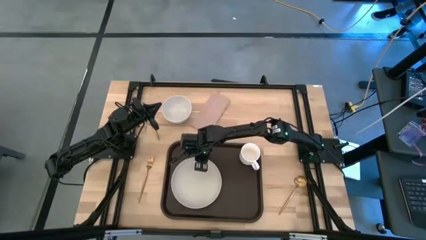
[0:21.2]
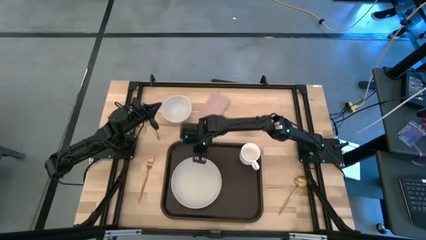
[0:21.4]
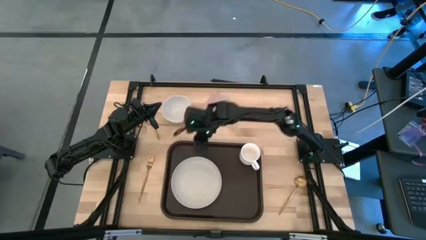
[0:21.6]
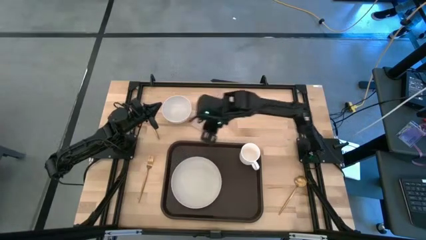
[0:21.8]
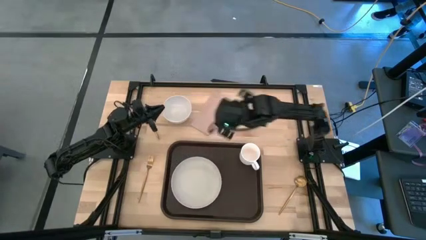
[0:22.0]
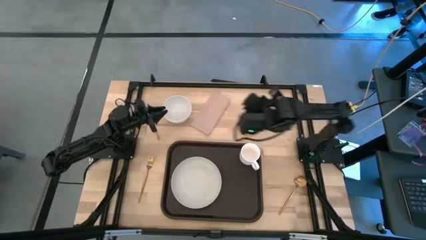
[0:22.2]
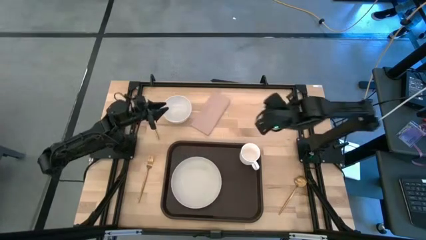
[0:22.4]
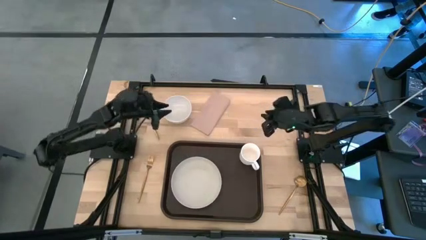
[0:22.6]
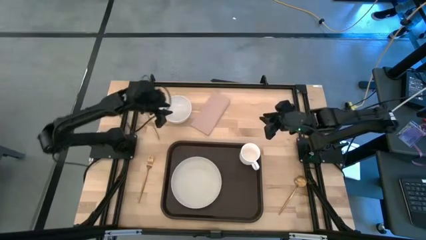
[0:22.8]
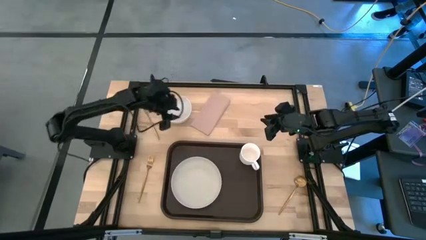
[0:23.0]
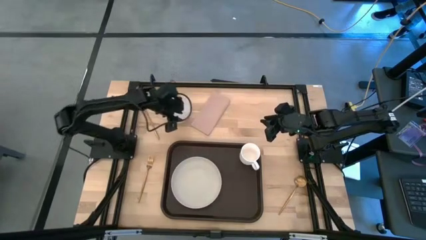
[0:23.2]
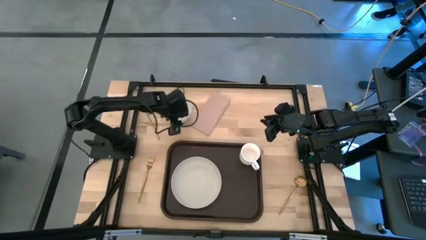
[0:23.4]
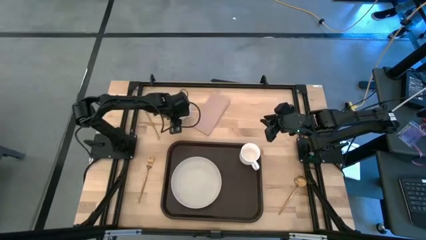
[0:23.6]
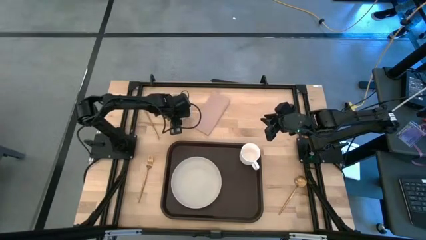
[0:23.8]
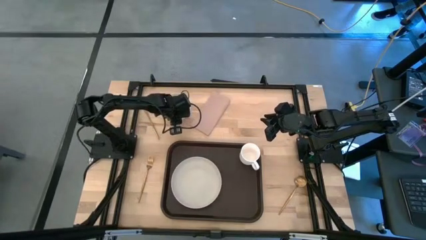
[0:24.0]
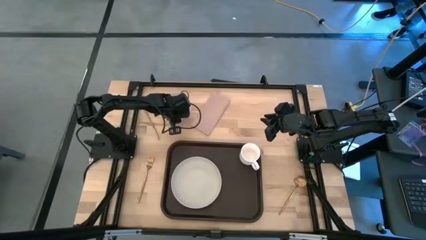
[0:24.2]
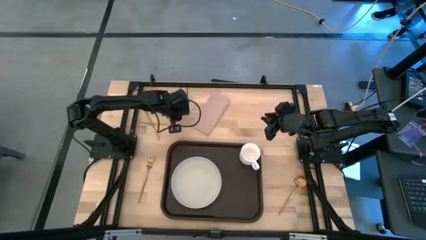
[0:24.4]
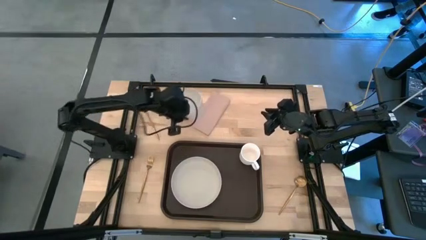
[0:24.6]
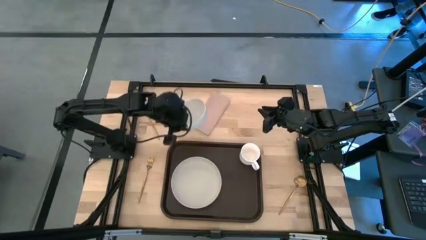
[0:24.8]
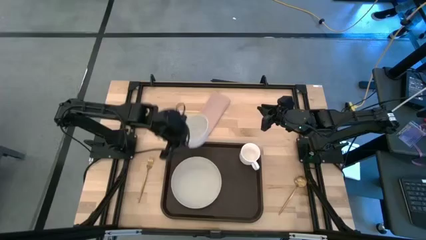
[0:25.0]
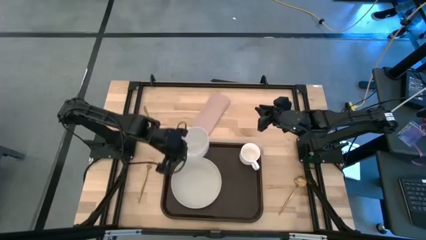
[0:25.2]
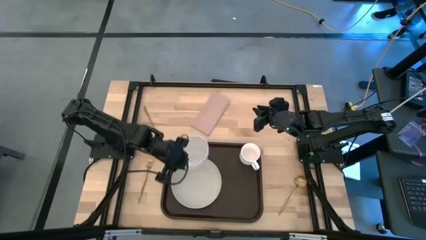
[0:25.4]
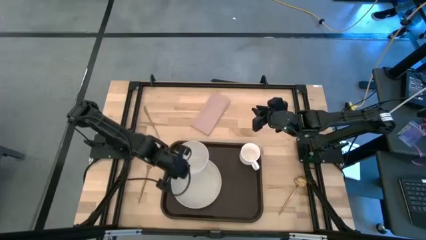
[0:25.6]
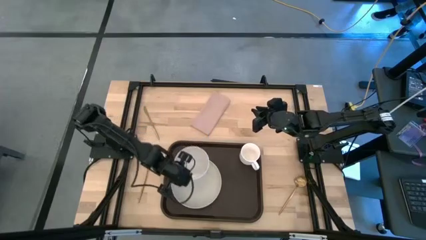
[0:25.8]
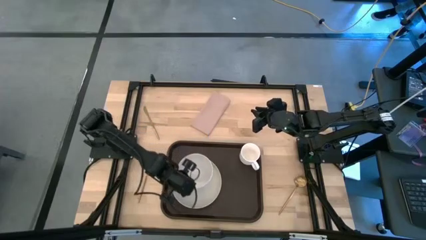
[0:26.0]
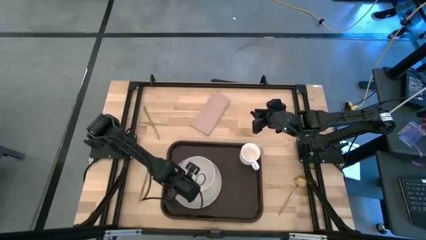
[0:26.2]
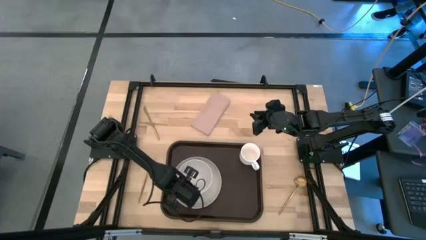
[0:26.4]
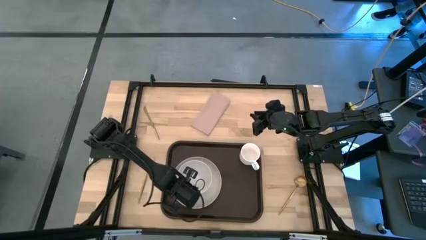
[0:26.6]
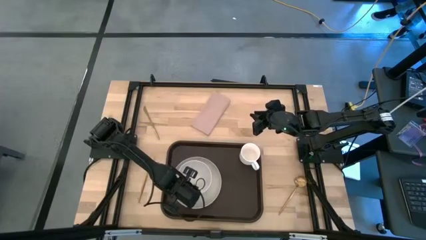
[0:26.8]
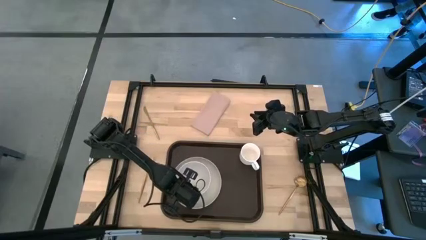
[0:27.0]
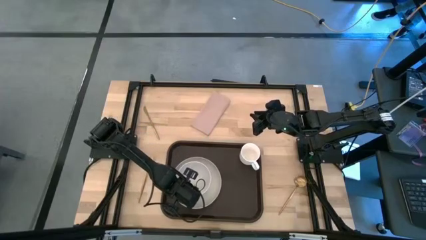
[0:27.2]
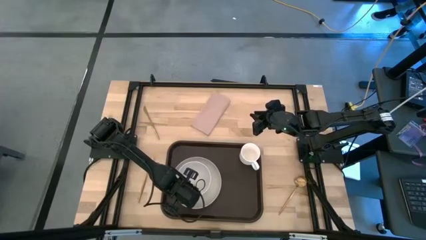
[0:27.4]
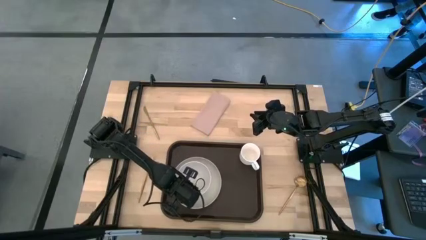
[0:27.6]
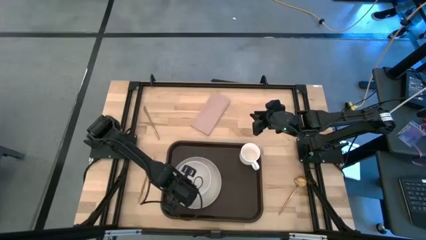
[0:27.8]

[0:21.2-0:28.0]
Task: Set up tray
Put the white bowl on top of the white plate on the brown serving tray

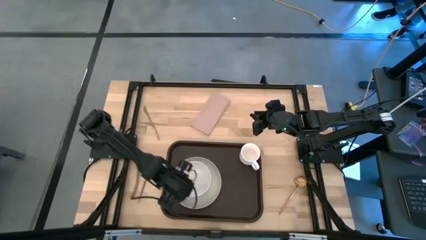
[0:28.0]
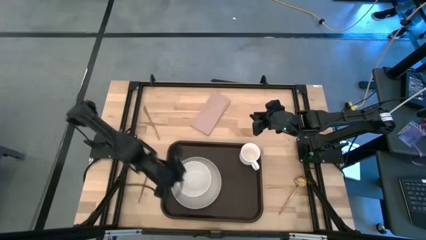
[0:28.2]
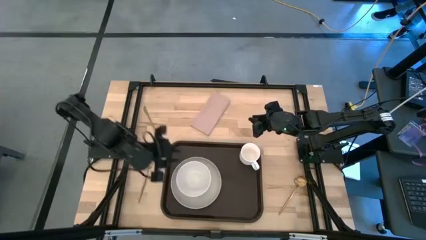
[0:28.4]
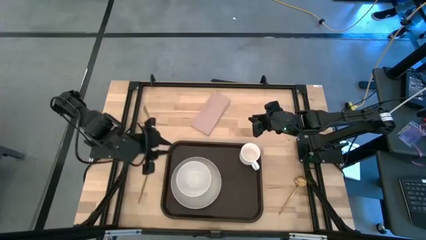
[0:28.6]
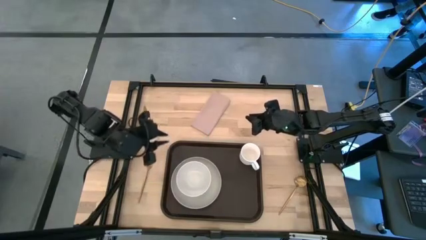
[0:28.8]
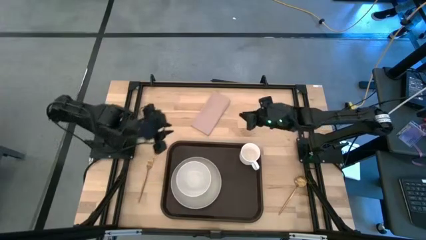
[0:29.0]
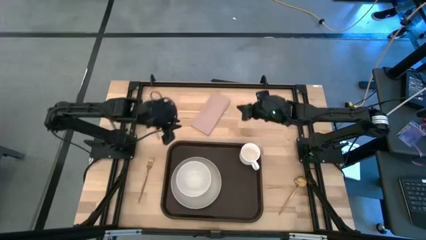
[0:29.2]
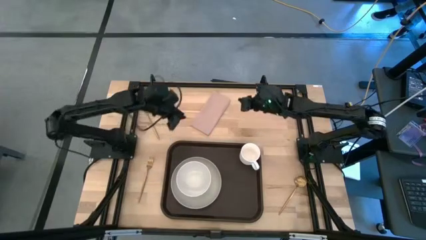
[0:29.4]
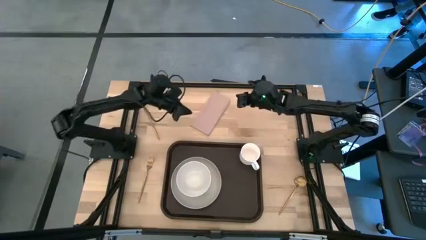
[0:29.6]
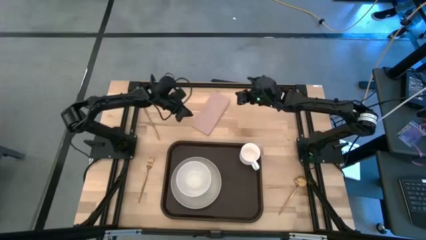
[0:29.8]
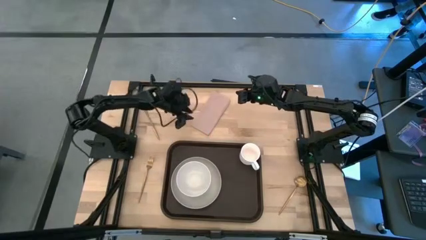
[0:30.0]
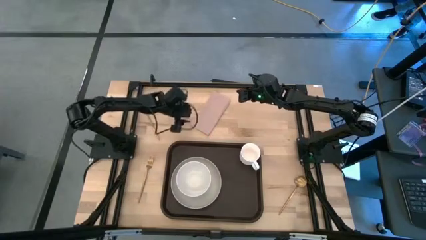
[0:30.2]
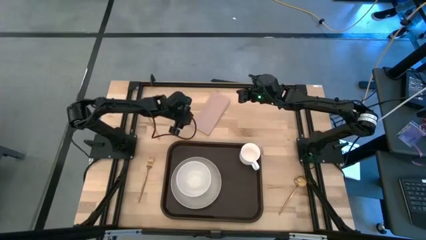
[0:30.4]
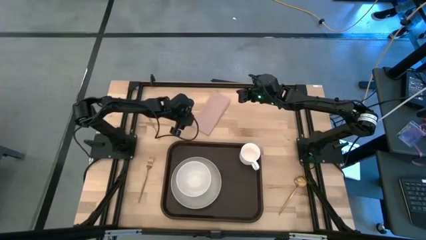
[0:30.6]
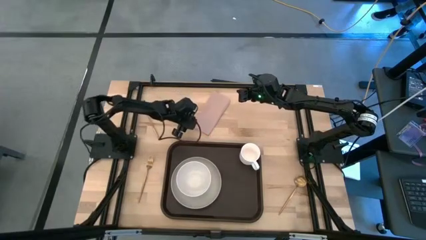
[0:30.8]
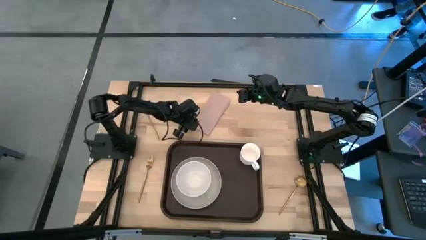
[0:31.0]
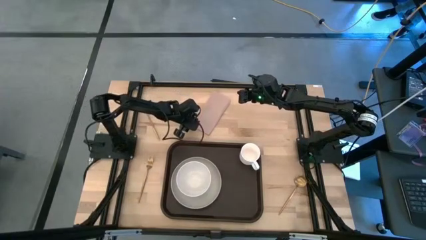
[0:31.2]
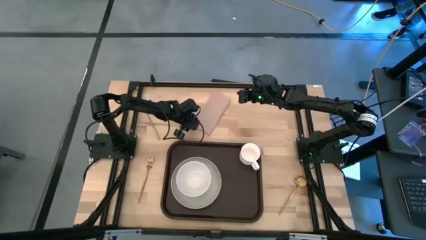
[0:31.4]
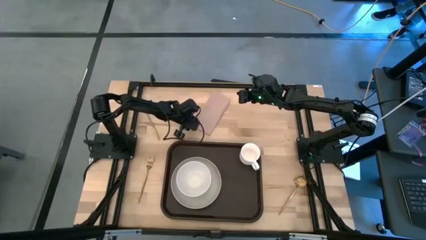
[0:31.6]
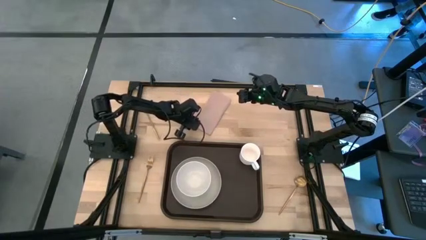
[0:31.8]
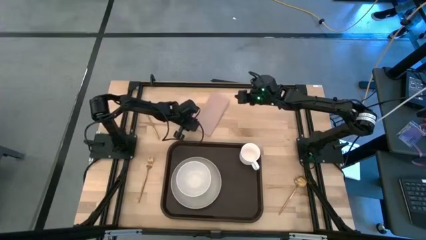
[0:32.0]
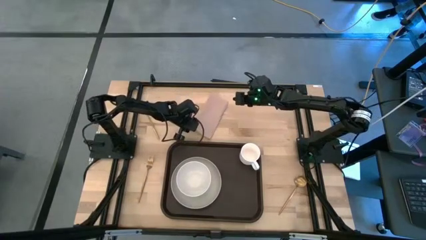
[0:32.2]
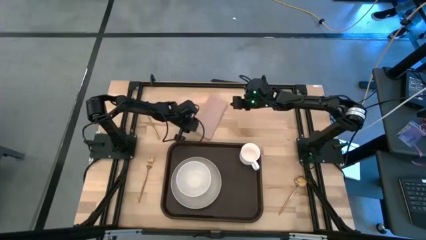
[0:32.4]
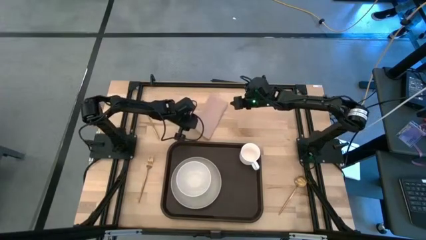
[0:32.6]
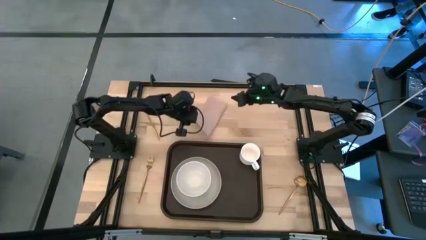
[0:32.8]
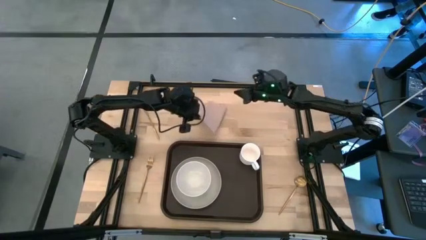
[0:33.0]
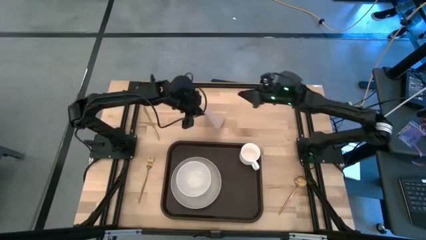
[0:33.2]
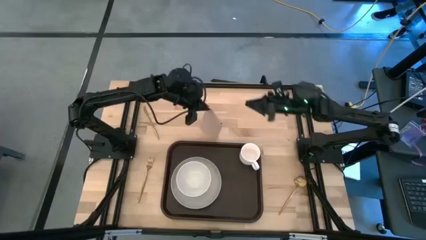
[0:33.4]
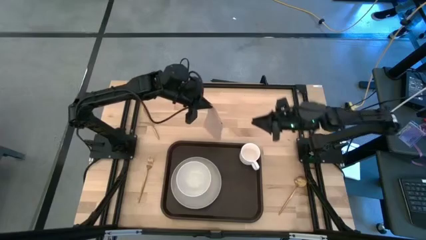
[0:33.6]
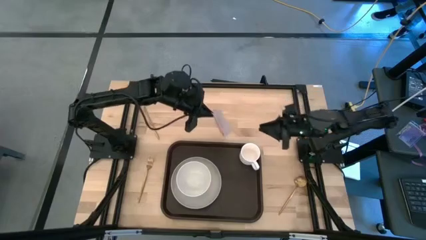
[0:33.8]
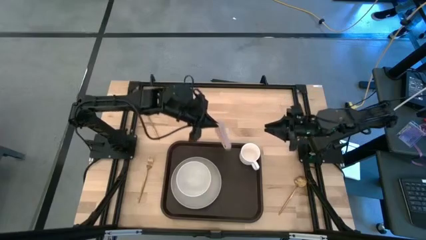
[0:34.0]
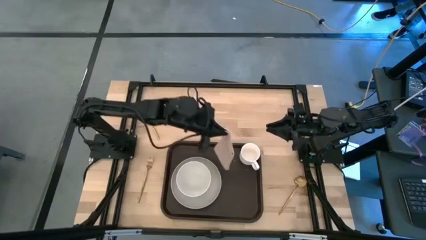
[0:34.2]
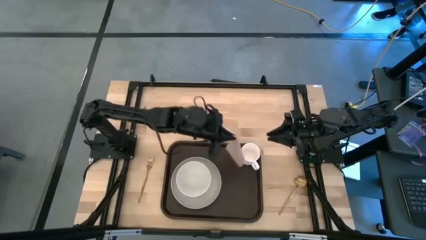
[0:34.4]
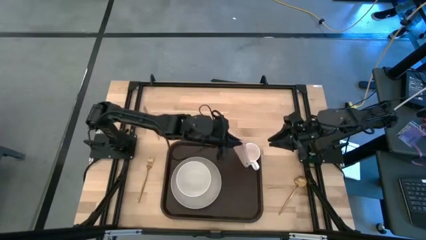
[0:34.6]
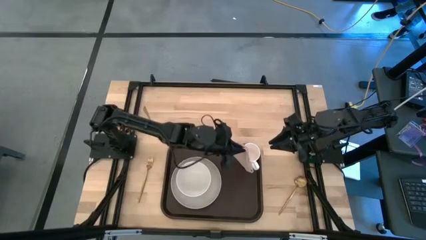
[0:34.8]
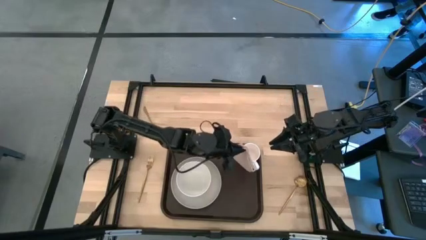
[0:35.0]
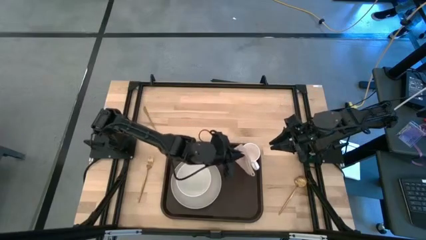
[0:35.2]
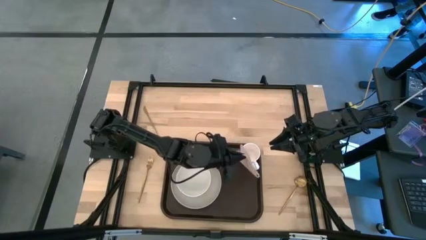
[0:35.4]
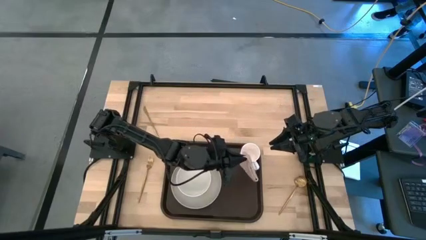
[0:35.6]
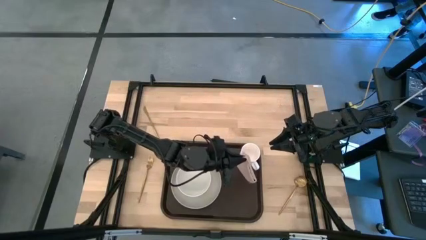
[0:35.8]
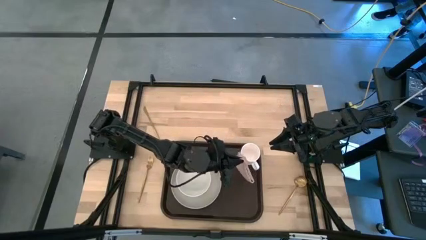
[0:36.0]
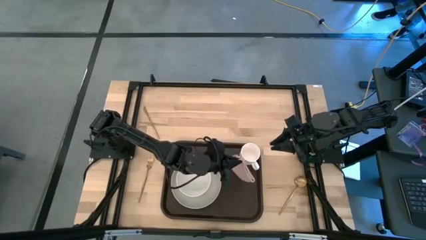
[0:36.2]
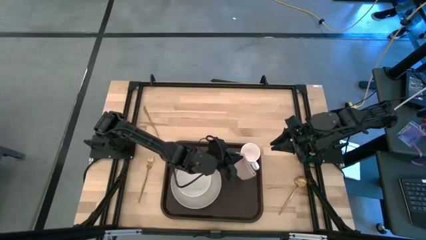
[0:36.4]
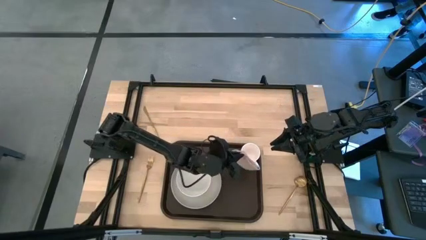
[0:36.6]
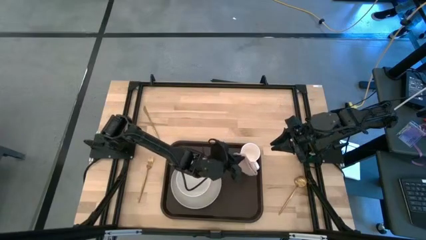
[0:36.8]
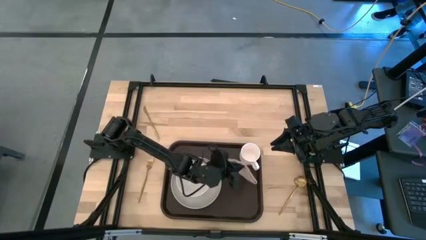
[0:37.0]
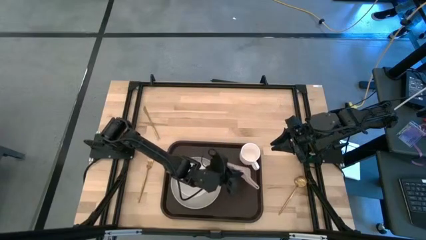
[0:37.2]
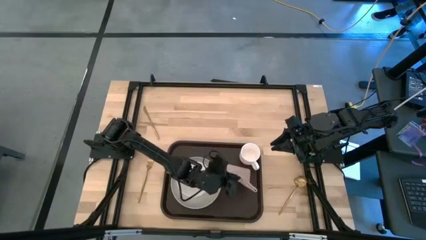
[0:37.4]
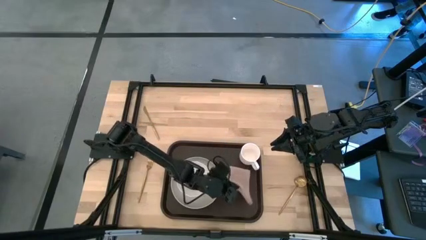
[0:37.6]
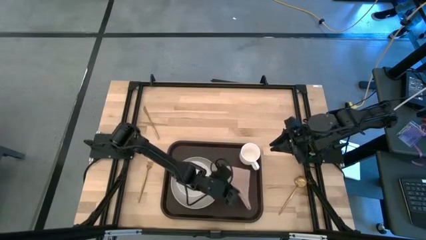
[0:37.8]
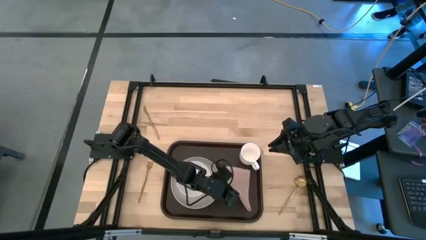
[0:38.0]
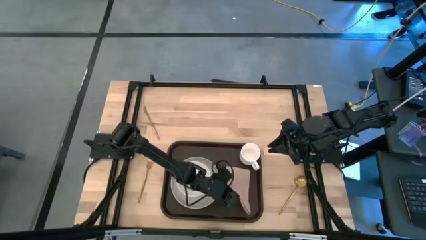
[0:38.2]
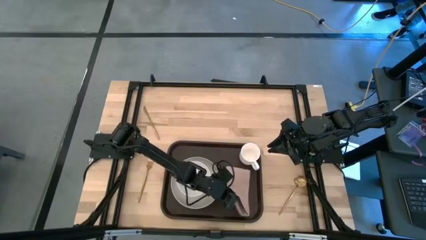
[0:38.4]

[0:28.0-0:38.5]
Put the brown napkin below the white mug on the brown serving tray
